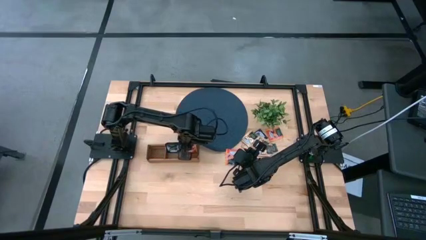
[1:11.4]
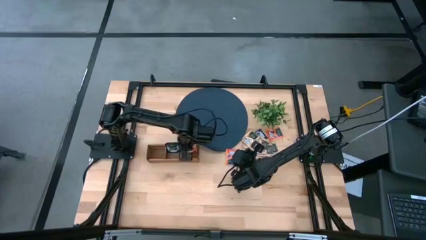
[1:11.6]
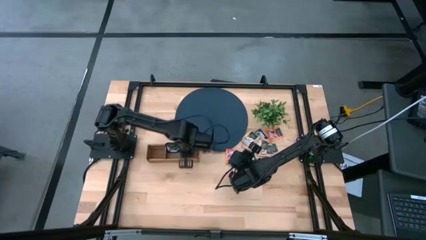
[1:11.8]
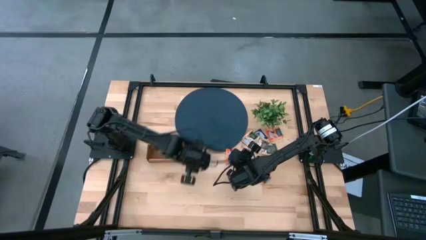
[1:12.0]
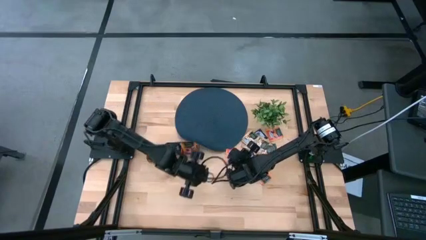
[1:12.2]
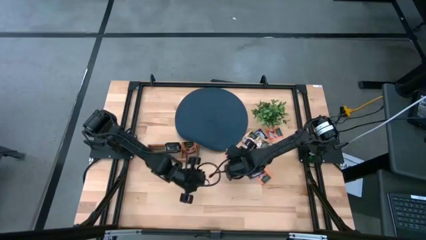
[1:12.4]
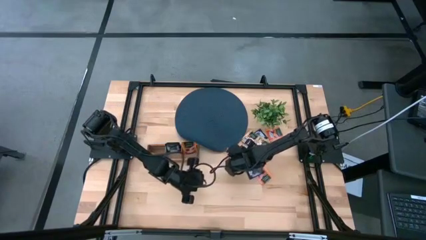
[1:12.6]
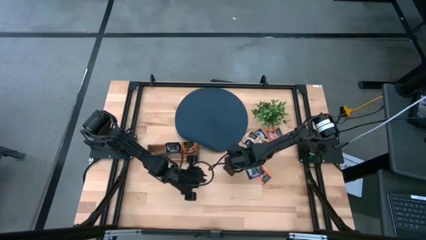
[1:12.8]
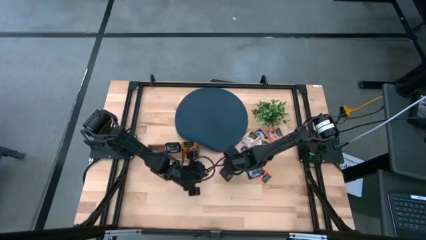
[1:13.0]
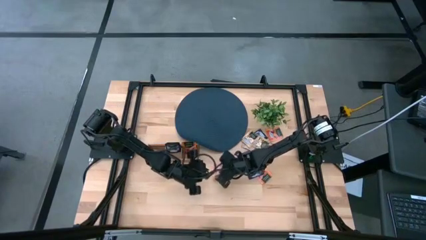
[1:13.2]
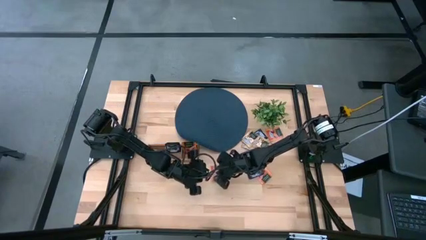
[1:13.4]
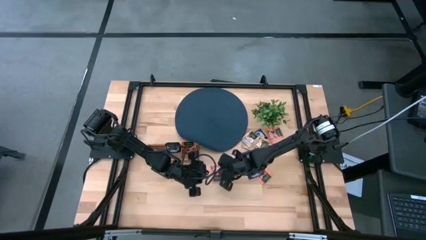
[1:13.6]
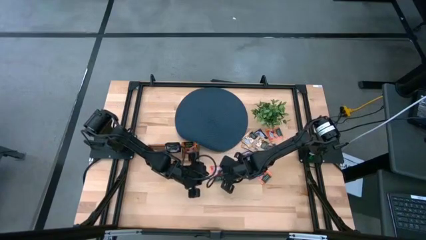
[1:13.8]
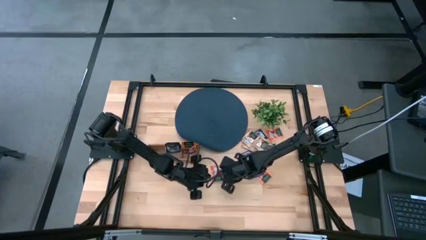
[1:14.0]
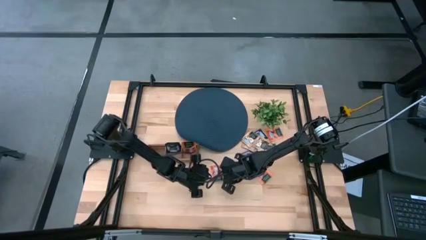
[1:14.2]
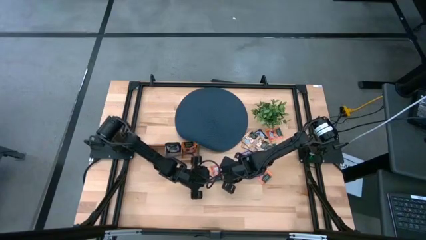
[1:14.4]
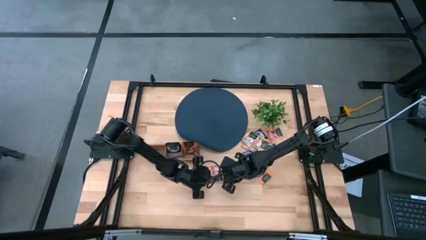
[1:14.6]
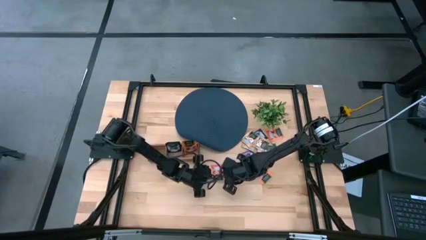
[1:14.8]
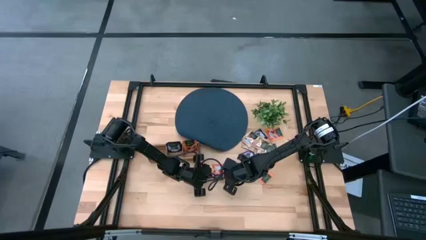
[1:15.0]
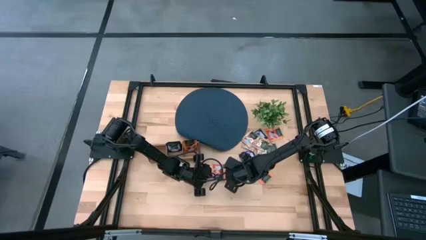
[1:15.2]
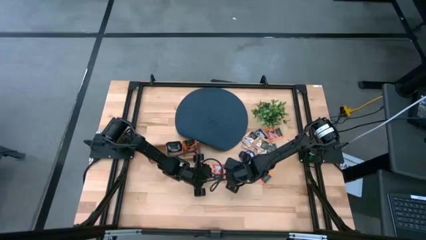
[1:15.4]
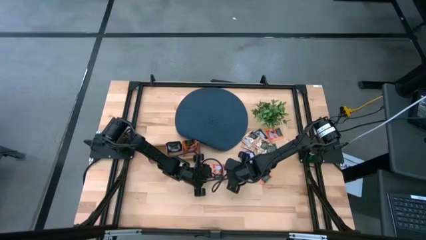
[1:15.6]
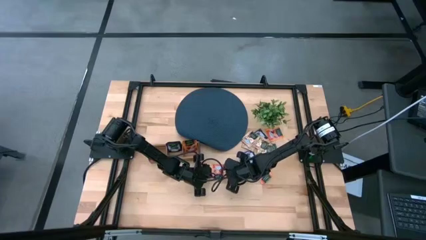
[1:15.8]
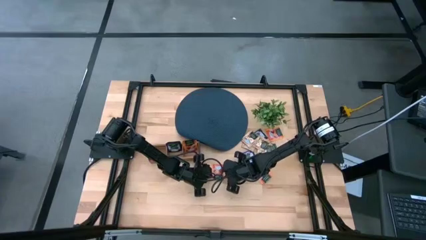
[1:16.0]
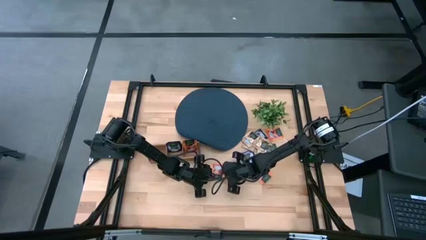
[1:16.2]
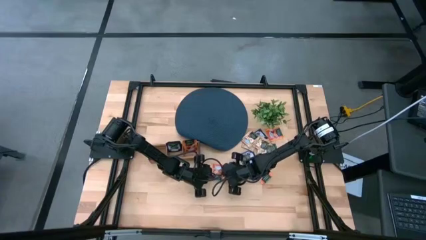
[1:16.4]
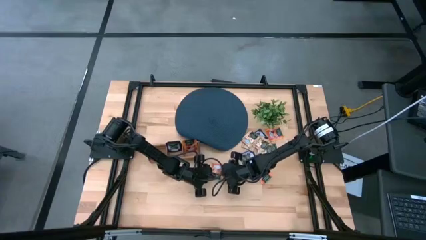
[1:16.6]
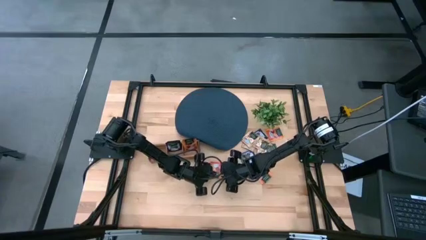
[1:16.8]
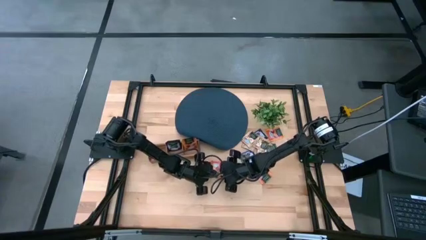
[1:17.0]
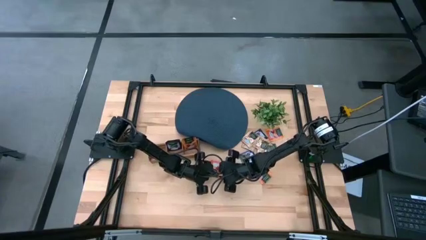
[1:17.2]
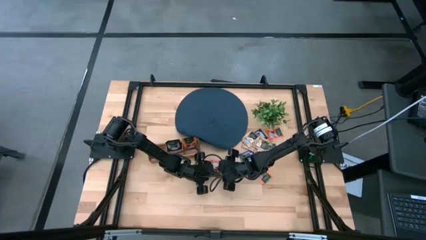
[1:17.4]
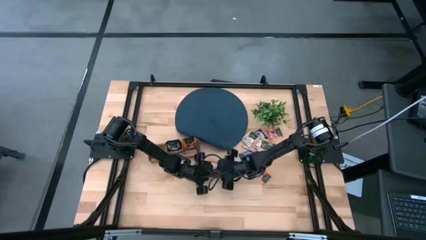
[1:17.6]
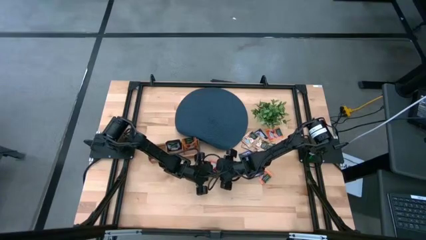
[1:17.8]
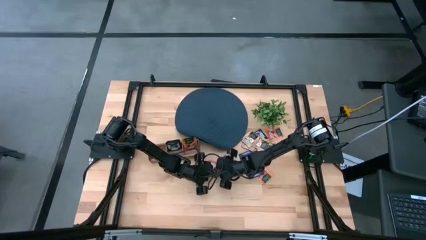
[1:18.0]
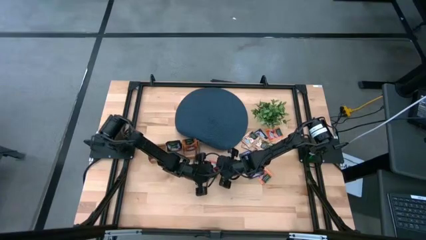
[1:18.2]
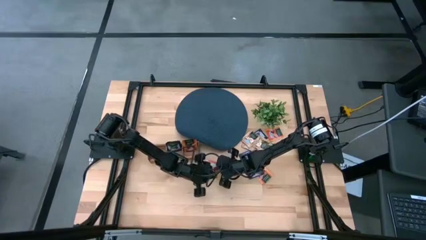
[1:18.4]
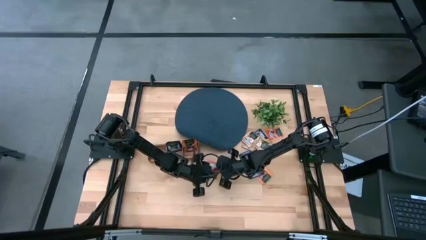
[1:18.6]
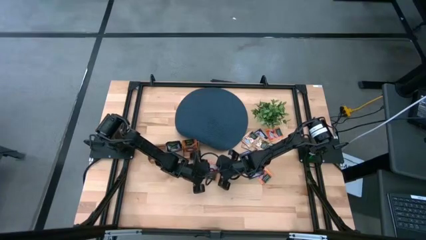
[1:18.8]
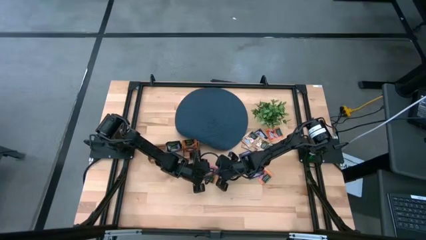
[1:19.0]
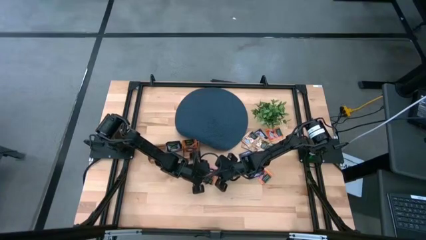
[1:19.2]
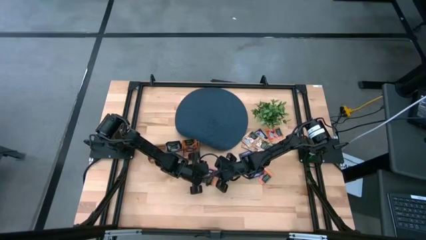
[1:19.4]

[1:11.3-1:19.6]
Task: Pick & Place Tea
Put the orange tea bag into the right section of the wooden organizer

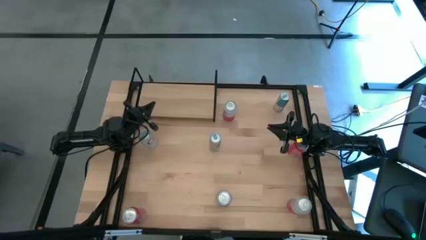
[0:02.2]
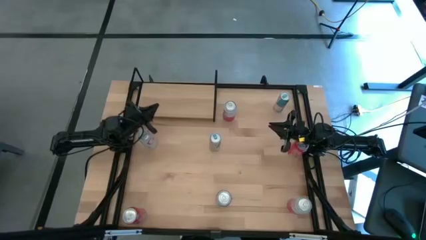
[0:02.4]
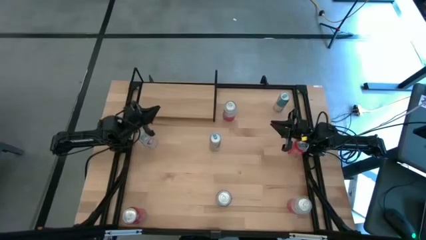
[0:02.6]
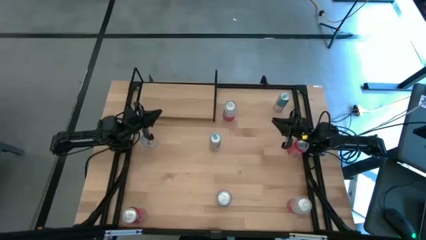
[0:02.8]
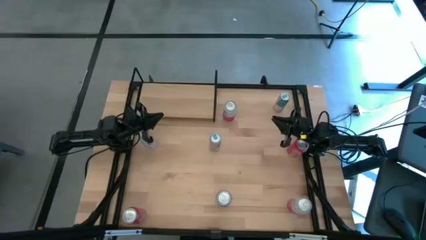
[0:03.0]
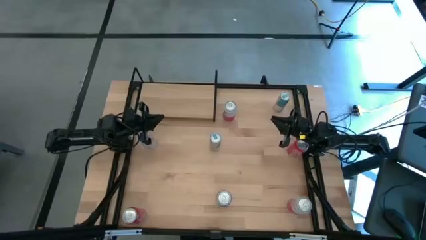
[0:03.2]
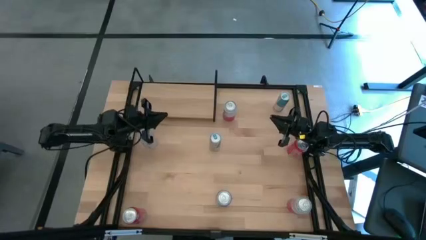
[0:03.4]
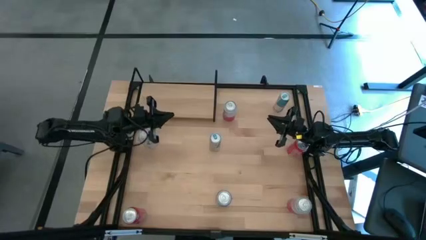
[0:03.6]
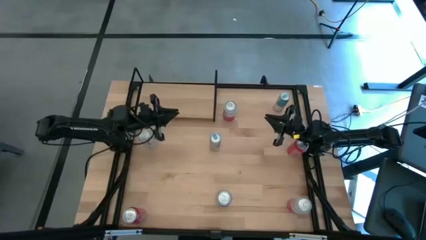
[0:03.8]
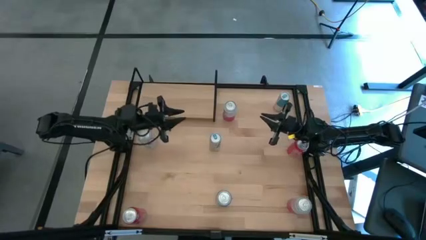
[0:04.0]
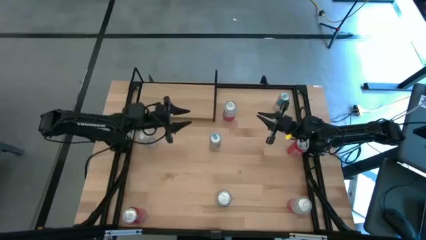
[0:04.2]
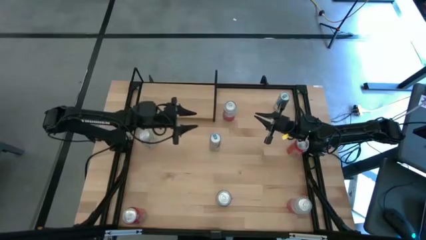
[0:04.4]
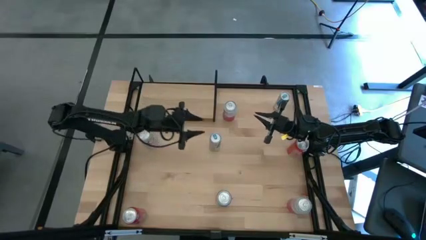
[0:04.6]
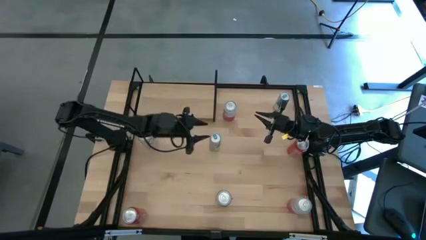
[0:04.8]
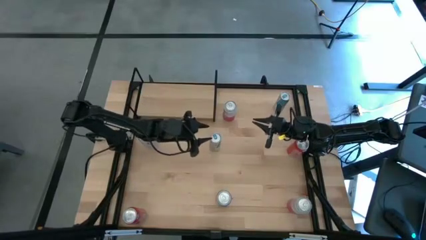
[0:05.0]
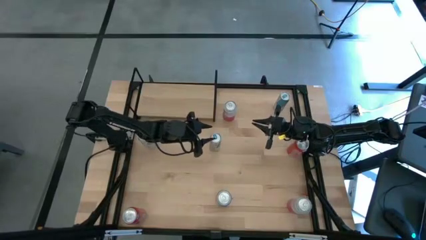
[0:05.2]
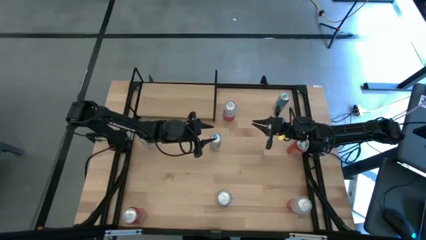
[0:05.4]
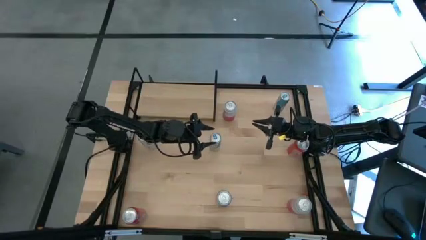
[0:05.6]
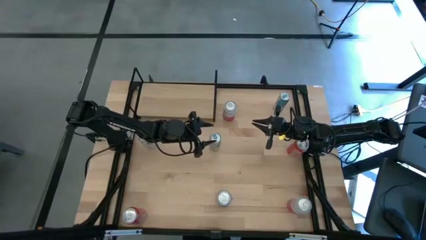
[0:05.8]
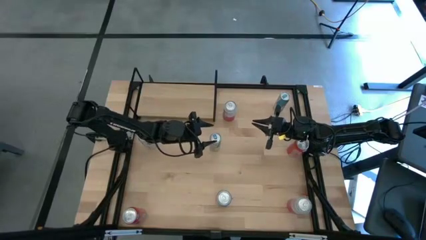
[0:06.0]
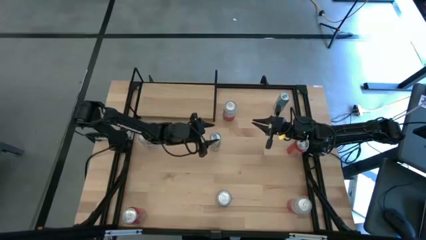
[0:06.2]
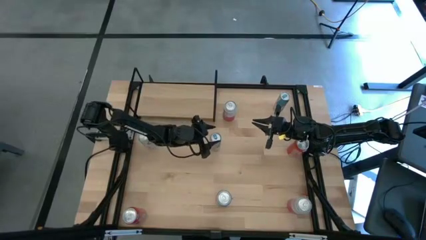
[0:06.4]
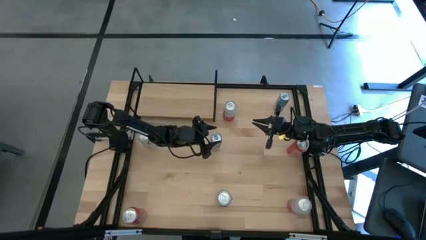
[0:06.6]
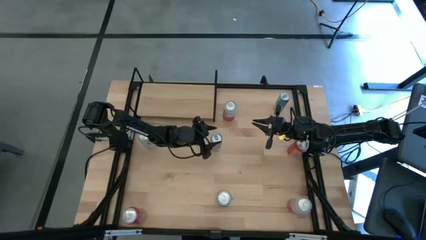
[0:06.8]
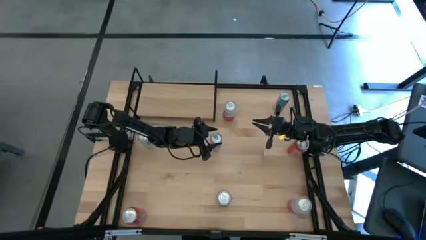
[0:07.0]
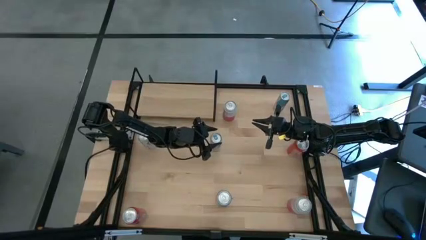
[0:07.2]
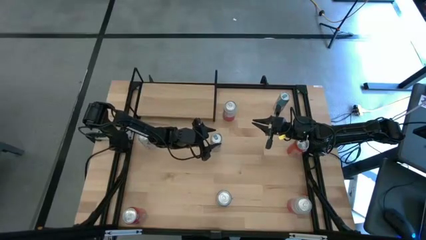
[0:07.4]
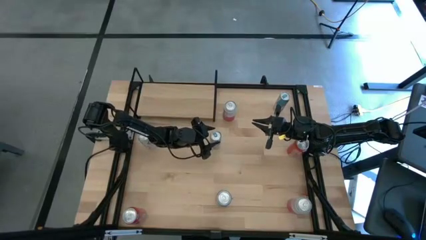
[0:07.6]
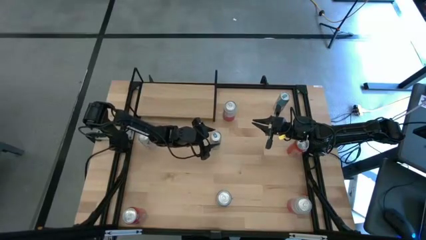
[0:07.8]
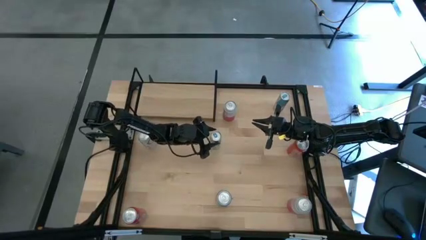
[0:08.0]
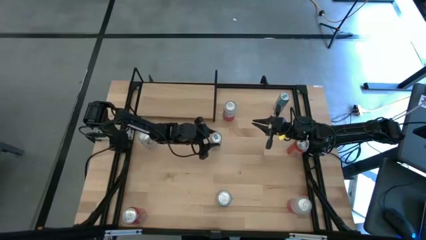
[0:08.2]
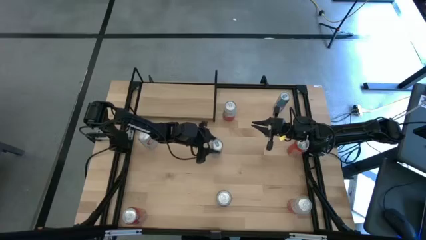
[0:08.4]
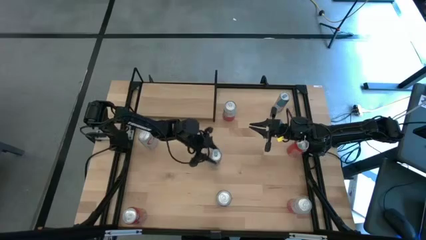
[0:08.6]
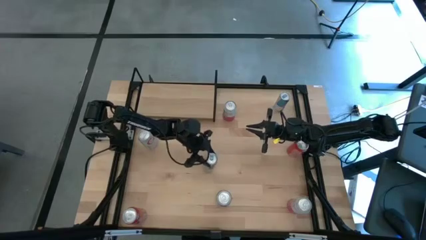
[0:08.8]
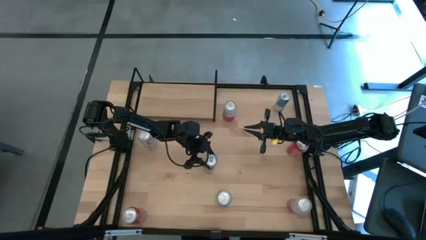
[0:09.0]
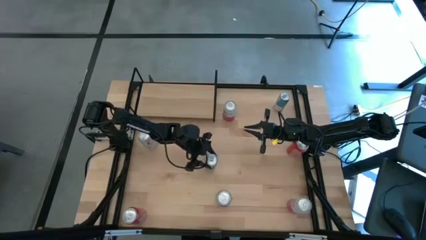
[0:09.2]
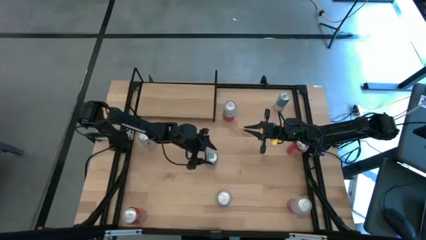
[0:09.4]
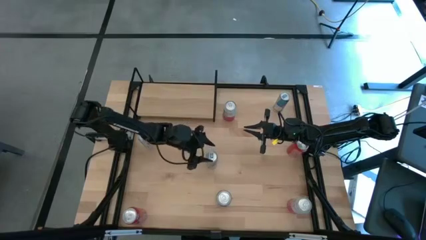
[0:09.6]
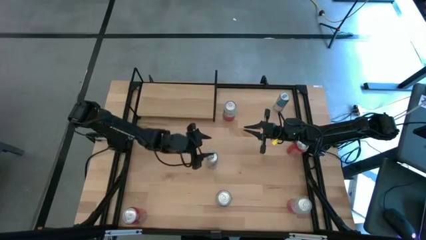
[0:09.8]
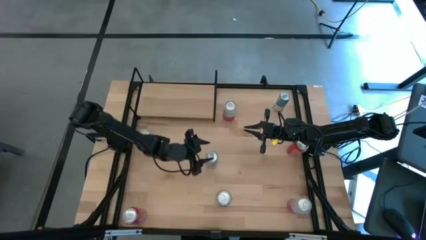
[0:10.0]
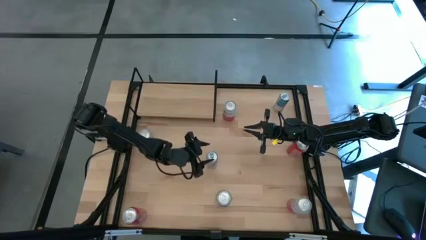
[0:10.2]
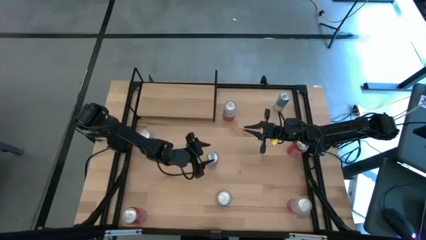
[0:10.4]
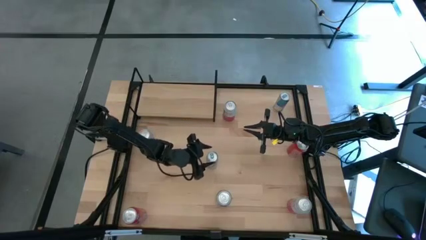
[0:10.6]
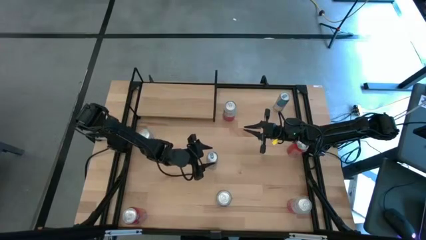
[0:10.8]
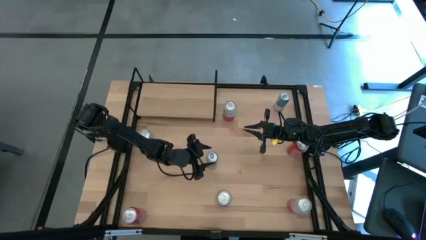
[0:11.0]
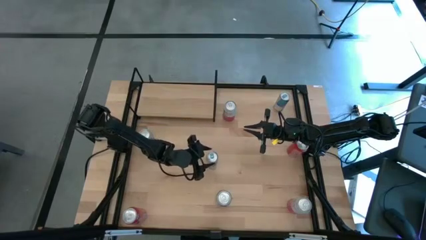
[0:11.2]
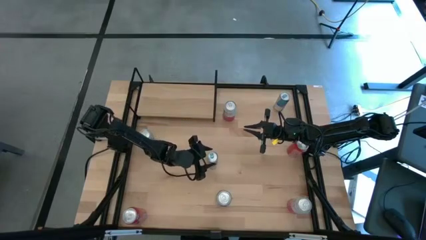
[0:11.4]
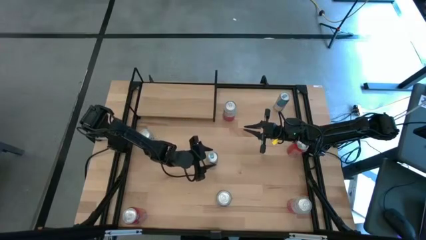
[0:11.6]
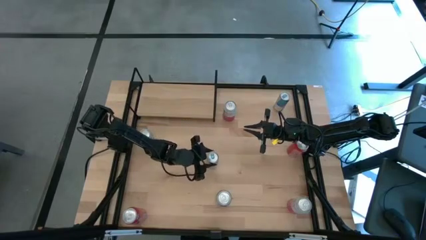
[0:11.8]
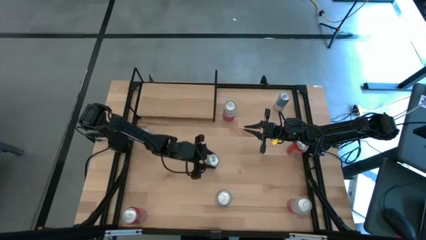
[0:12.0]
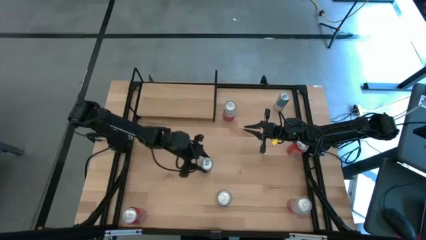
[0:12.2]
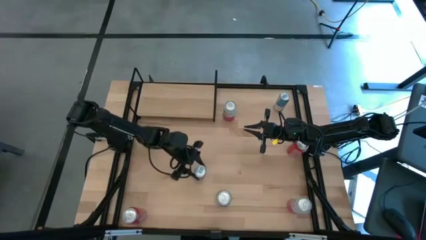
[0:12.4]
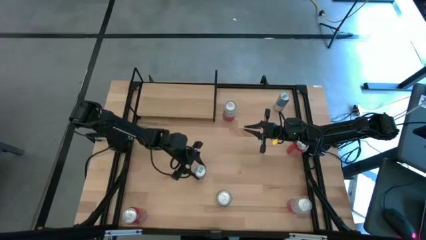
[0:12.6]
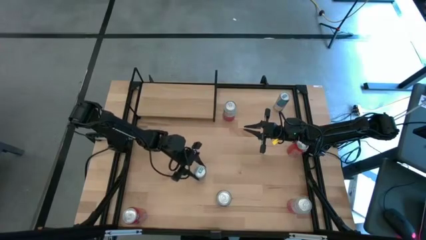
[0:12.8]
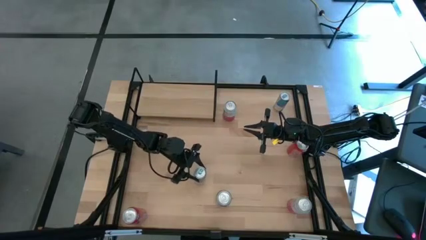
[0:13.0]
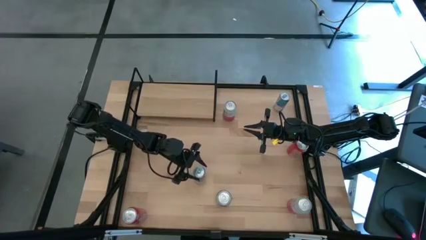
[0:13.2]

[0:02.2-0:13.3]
Task: Place canned beverage on shelf
Put the bottom blue soda can on the shelf
